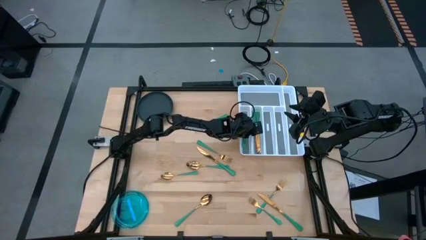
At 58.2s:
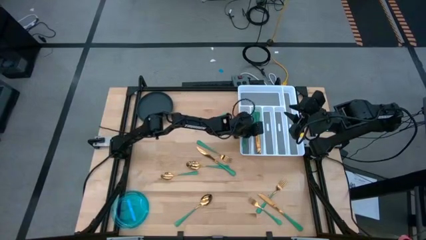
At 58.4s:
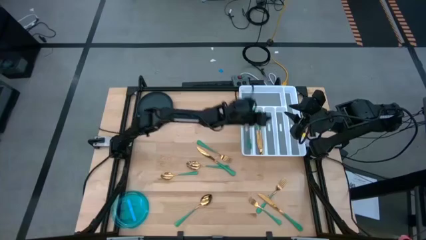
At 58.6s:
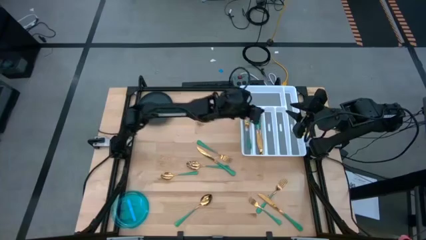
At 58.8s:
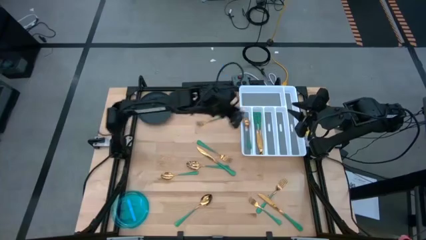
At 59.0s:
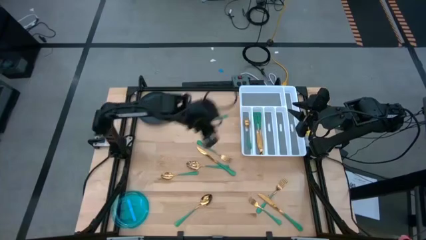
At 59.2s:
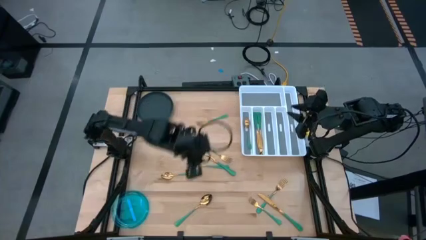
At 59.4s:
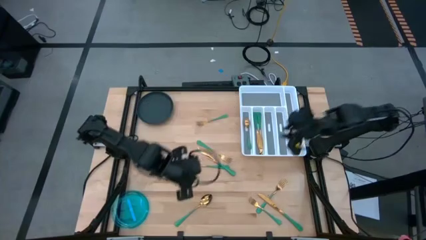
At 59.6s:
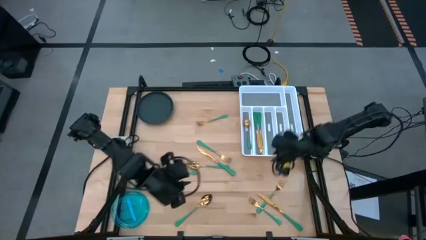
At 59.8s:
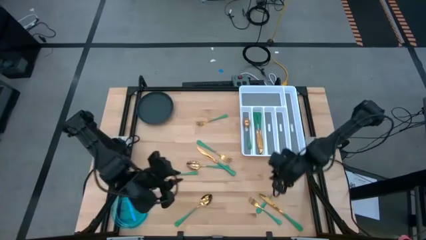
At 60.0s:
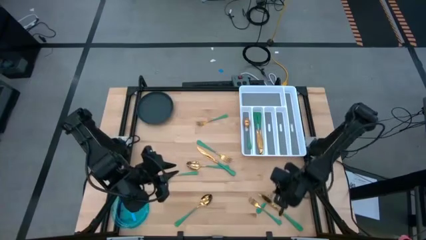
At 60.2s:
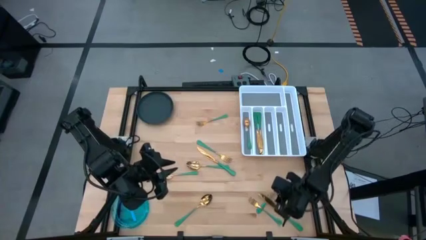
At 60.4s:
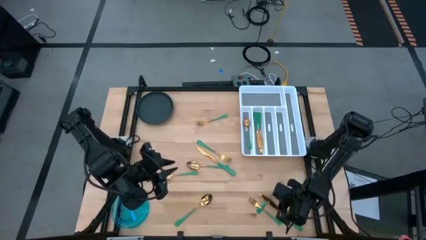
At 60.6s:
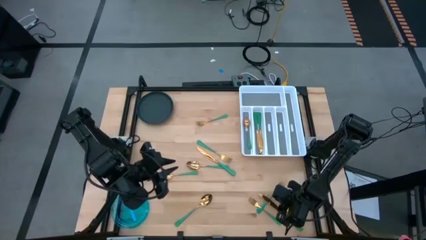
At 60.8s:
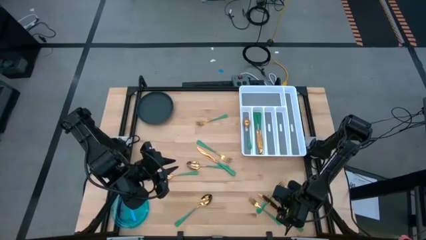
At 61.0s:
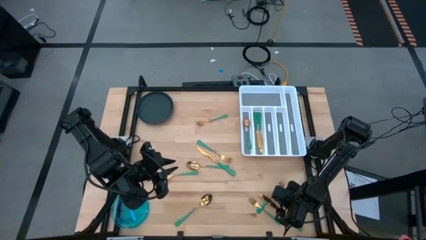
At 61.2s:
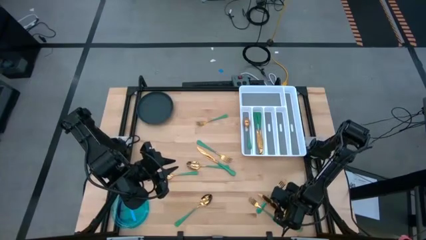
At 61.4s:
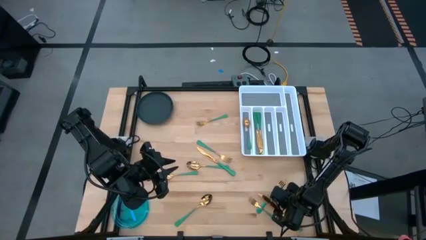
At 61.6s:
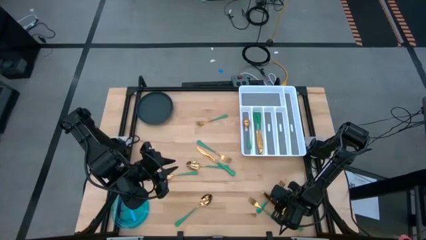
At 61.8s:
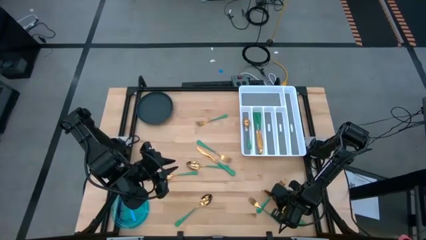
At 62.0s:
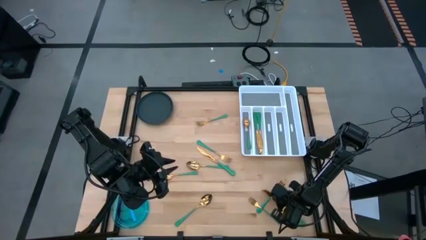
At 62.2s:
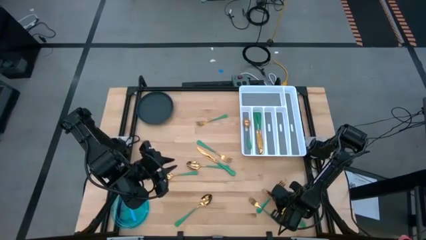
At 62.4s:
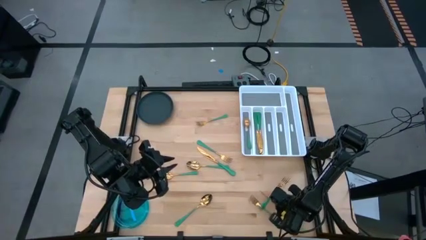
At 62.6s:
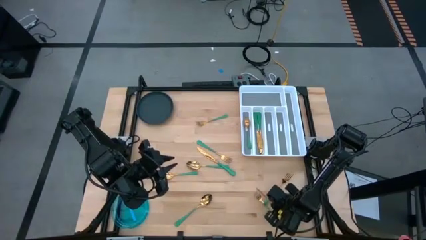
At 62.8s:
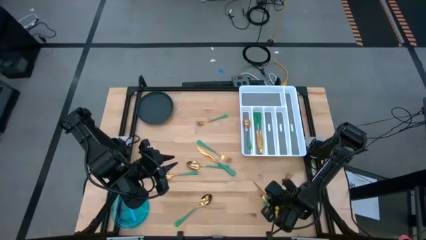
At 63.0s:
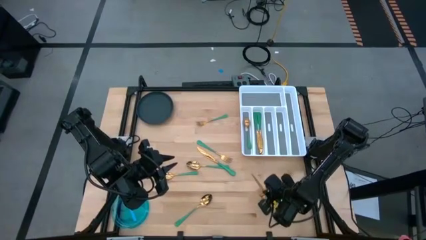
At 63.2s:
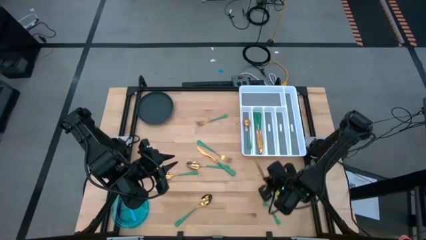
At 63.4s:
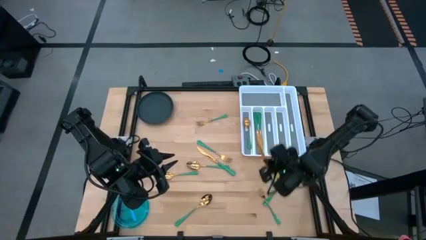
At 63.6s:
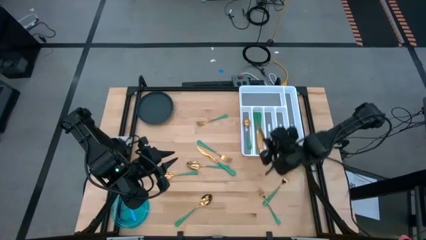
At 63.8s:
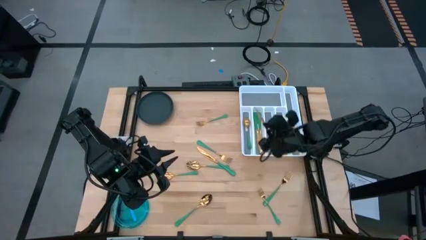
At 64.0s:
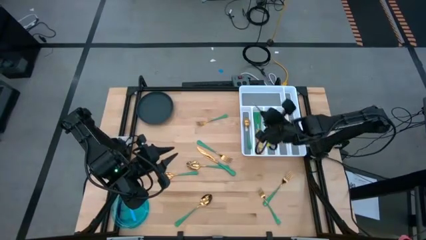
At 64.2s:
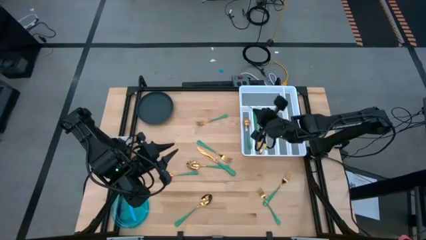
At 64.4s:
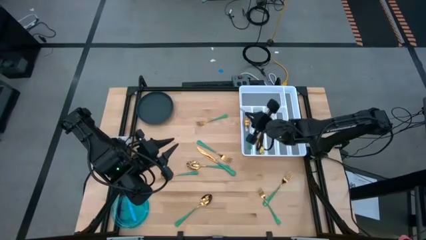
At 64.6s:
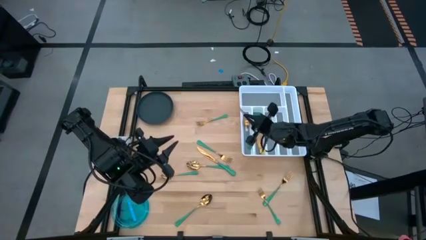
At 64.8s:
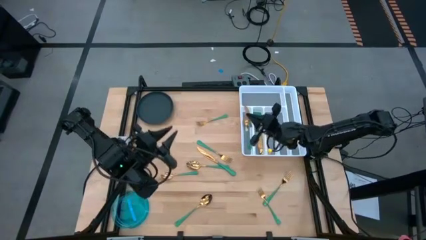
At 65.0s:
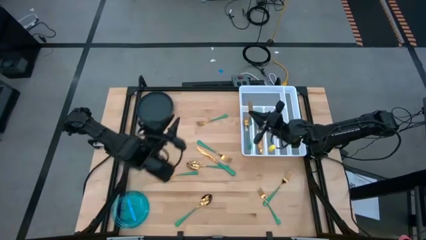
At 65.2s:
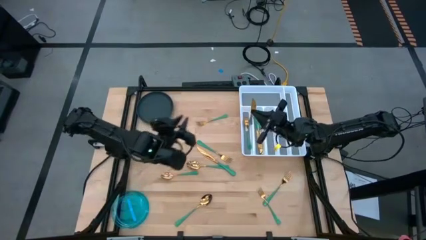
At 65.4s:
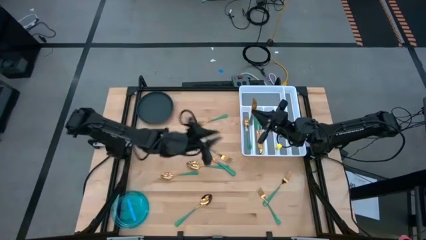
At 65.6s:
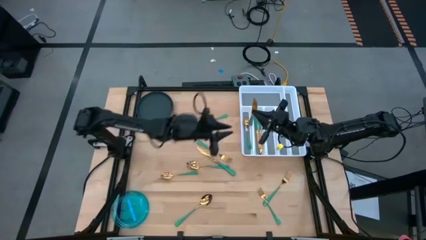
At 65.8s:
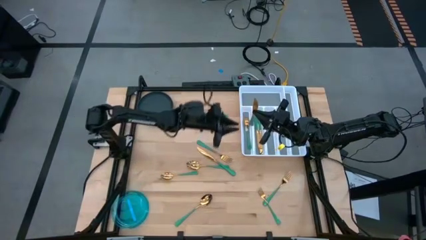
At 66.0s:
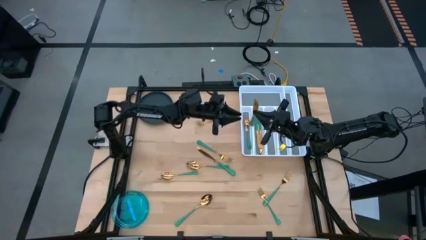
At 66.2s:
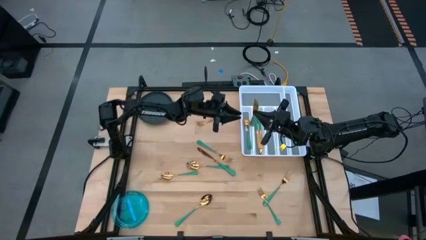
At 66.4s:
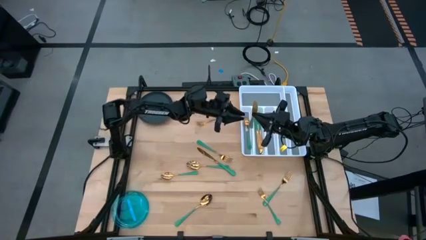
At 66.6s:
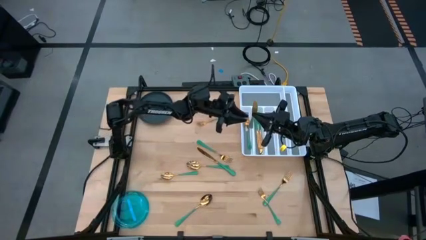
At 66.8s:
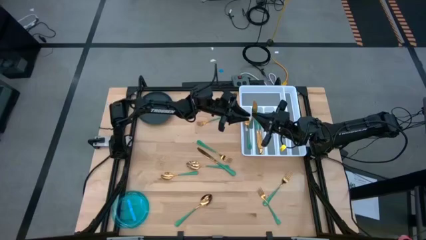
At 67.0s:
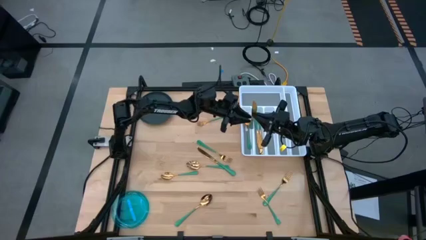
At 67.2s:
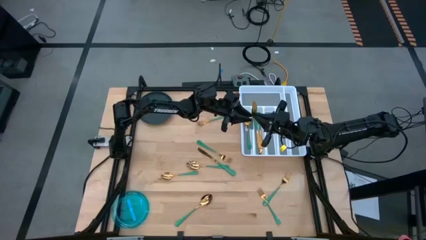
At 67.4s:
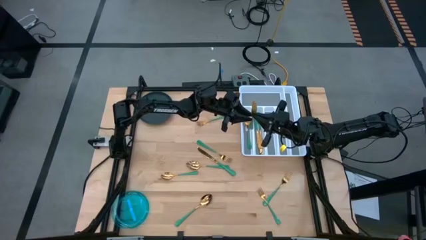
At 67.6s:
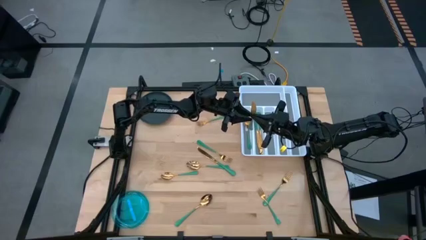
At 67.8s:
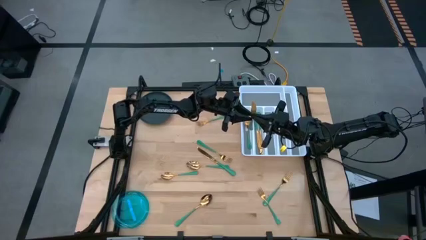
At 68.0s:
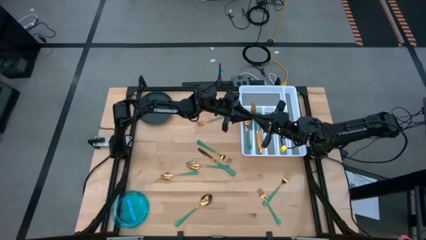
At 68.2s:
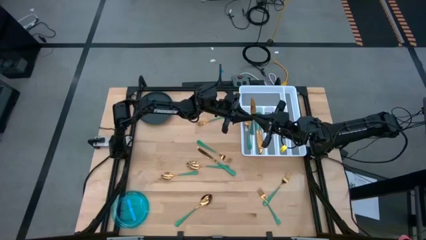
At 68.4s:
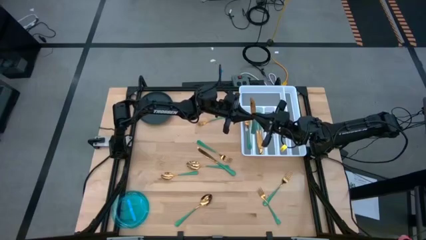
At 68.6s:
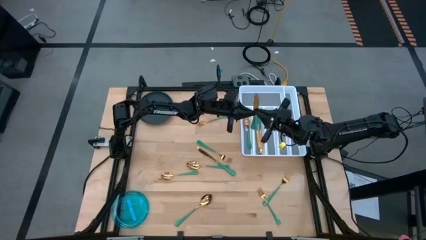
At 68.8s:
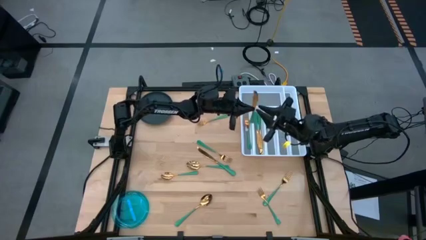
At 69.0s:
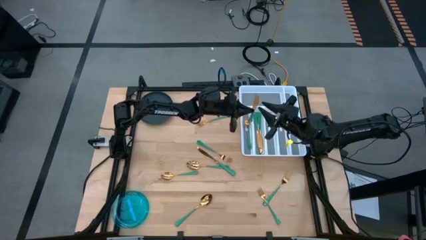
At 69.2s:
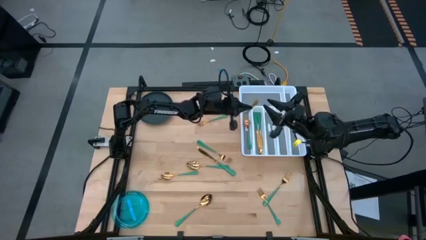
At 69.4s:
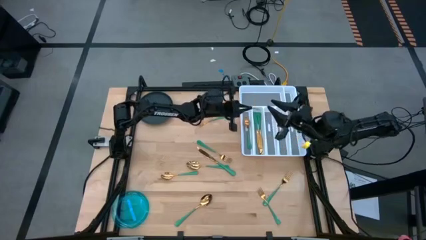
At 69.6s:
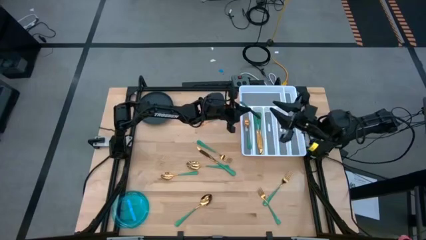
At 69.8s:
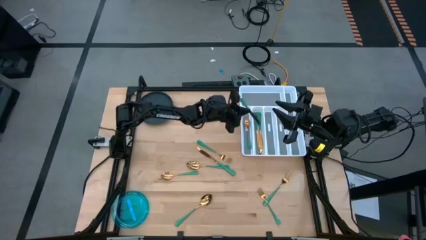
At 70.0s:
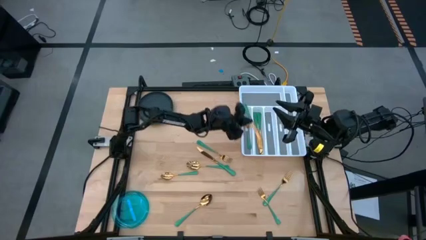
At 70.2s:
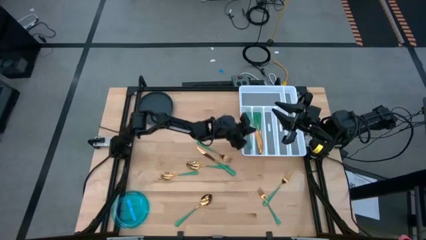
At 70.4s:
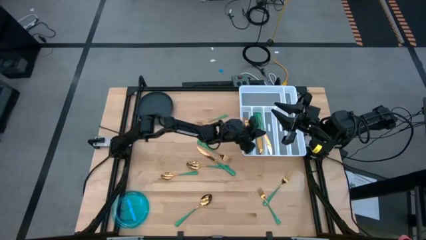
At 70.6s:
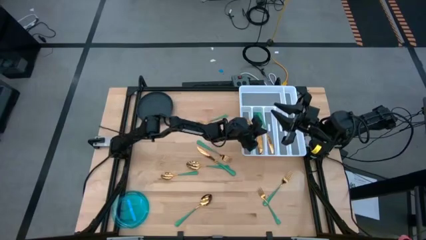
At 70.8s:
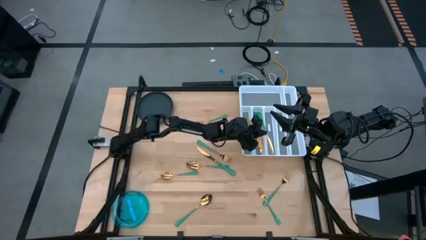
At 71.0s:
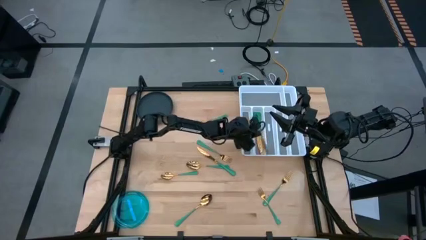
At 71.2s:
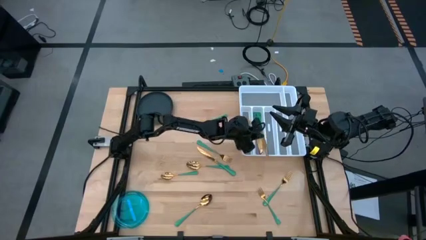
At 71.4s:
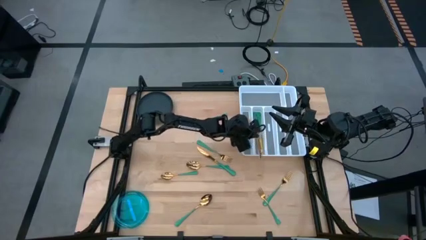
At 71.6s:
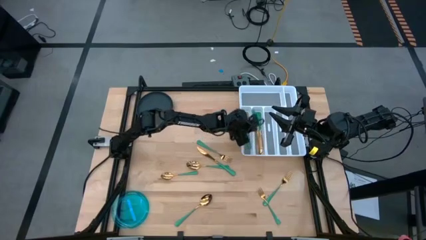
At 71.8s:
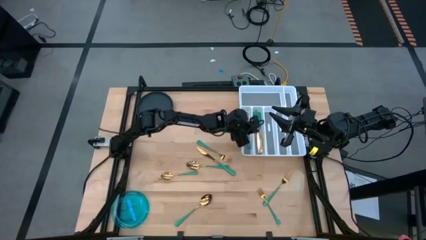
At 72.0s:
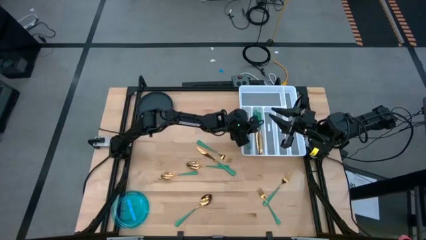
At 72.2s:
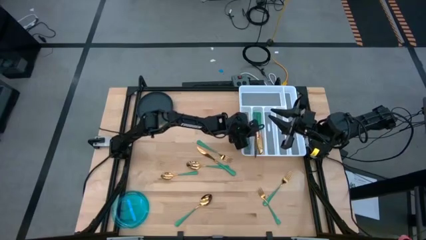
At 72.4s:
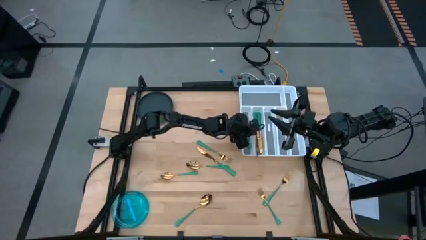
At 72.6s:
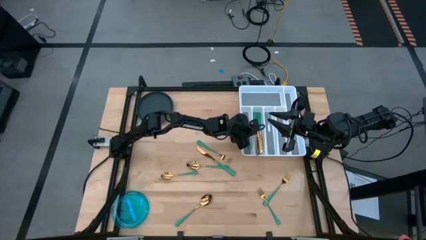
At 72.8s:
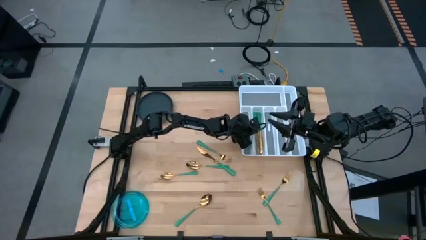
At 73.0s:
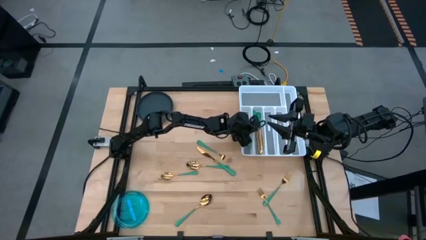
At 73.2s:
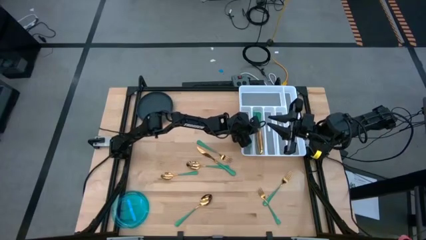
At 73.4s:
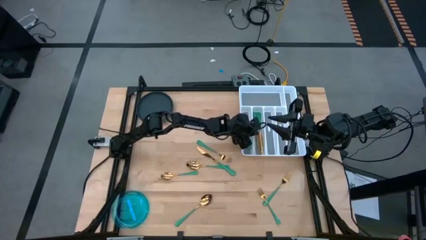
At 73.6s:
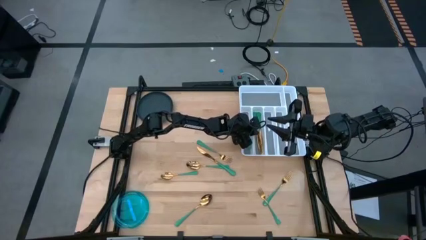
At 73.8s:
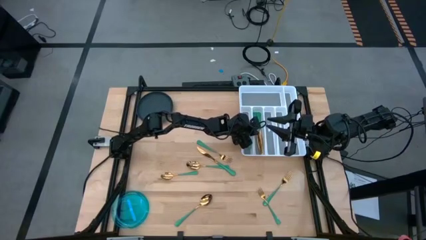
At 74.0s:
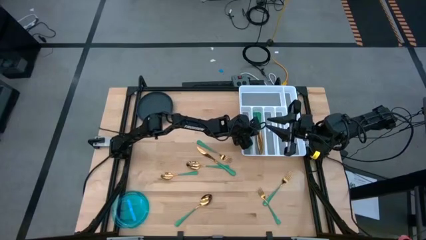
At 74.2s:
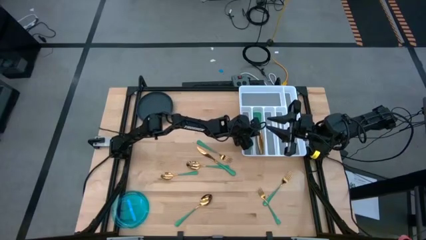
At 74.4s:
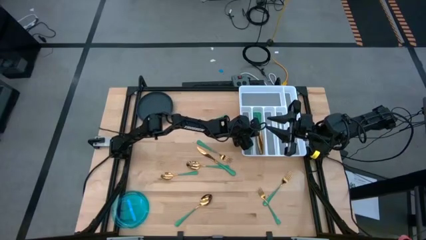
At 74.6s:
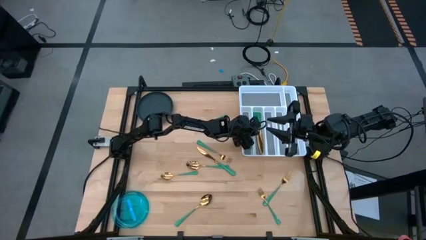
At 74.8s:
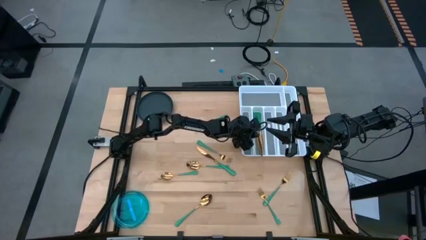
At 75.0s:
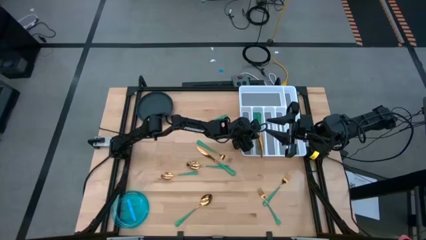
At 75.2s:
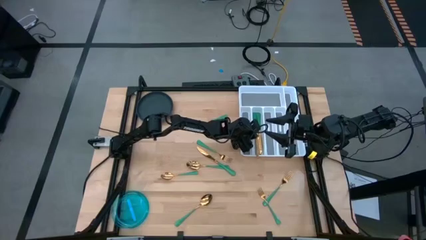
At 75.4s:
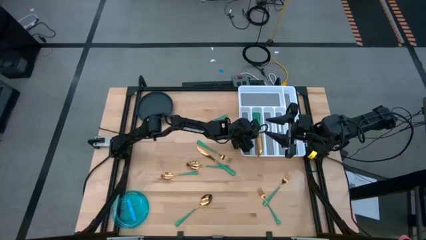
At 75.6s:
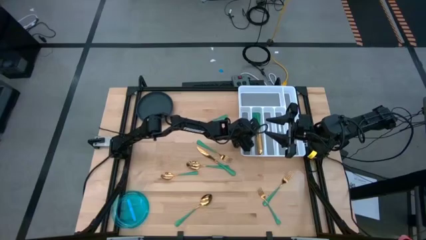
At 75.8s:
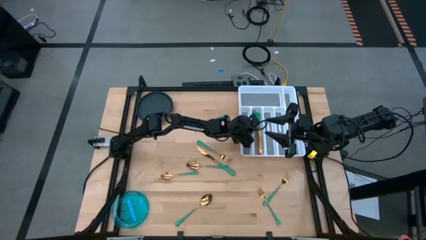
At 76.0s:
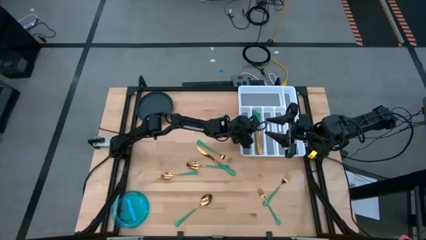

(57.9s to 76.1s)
Task: Sort silverware
Put the green knife into the silverware tray
